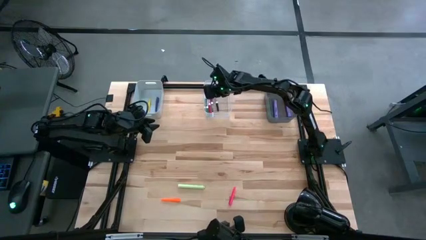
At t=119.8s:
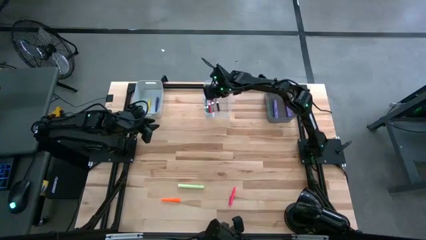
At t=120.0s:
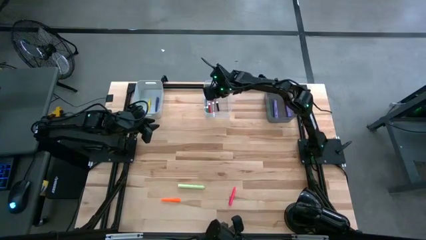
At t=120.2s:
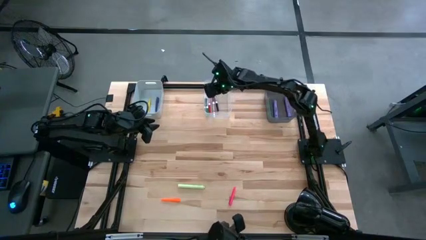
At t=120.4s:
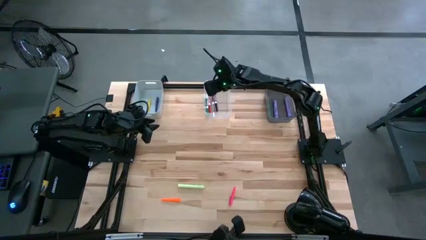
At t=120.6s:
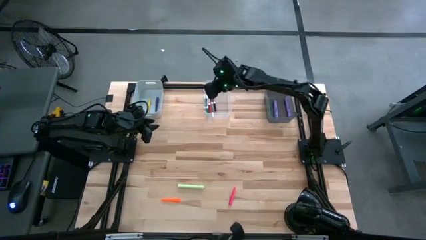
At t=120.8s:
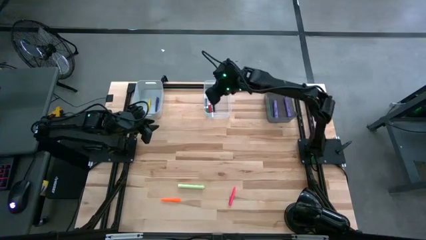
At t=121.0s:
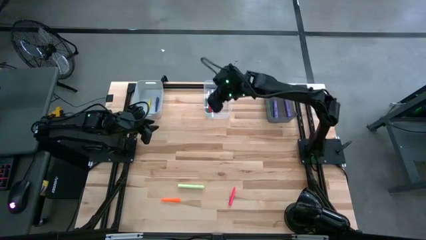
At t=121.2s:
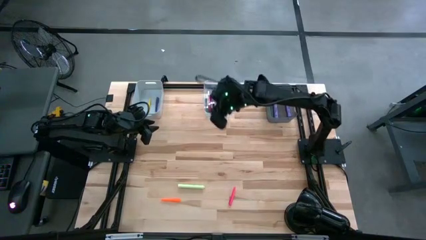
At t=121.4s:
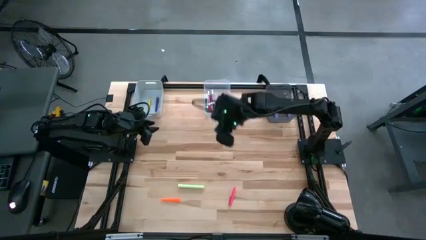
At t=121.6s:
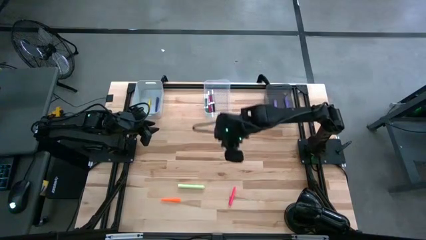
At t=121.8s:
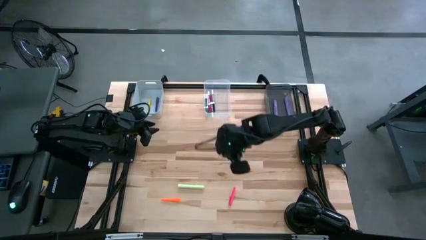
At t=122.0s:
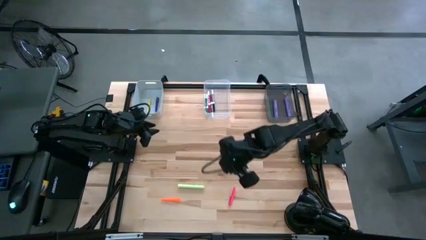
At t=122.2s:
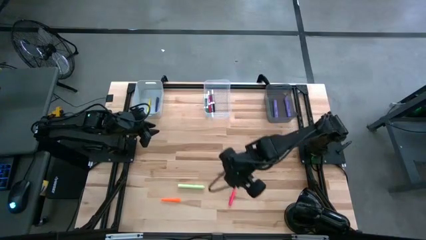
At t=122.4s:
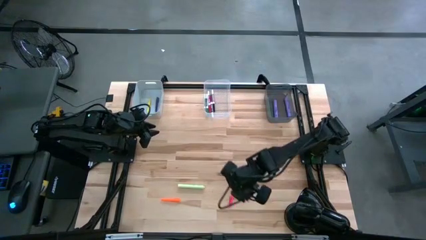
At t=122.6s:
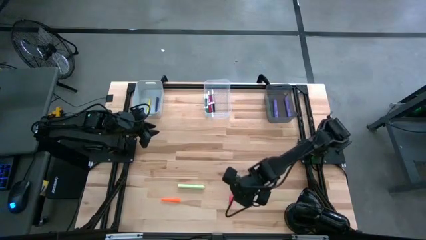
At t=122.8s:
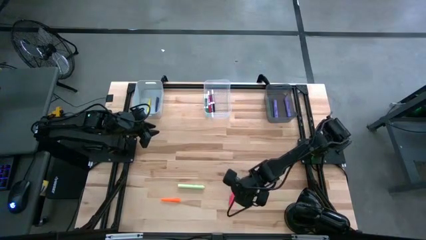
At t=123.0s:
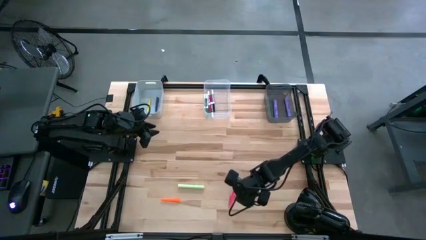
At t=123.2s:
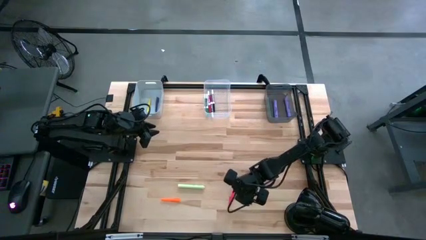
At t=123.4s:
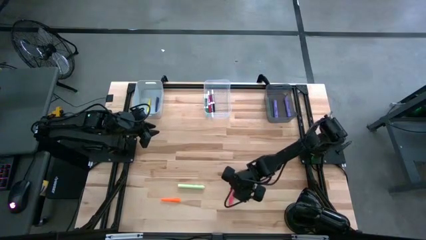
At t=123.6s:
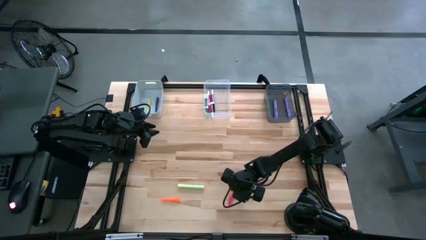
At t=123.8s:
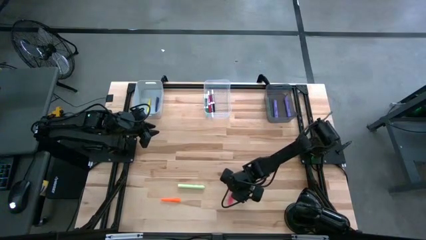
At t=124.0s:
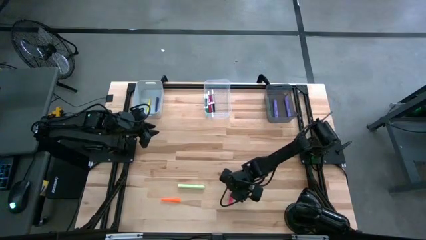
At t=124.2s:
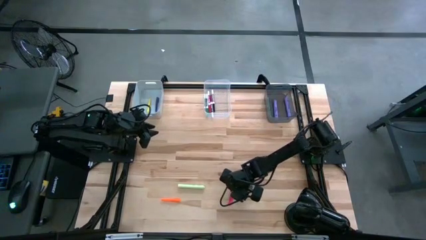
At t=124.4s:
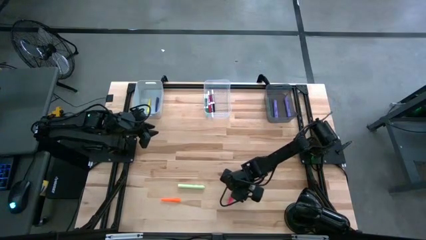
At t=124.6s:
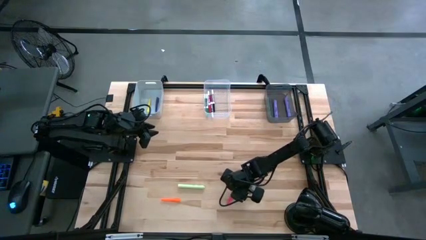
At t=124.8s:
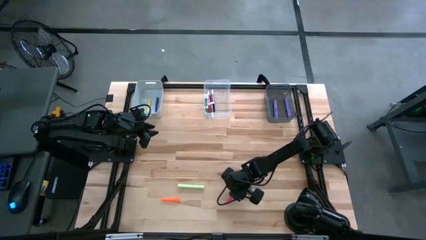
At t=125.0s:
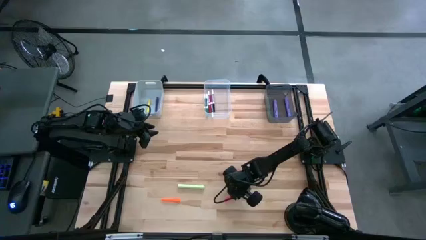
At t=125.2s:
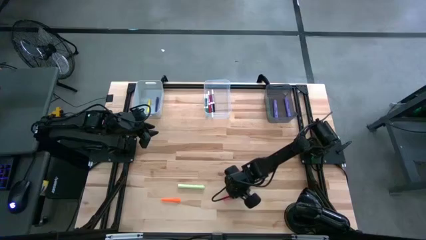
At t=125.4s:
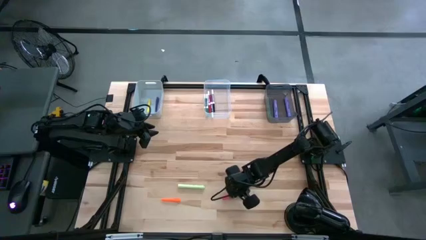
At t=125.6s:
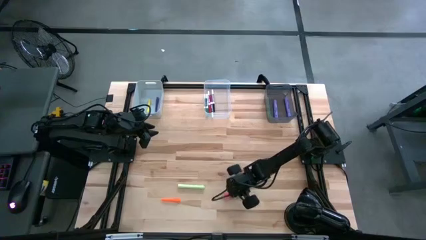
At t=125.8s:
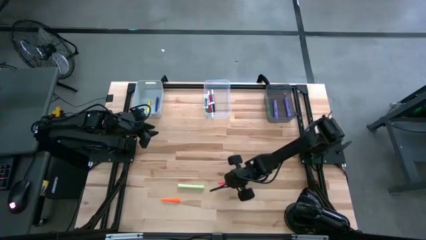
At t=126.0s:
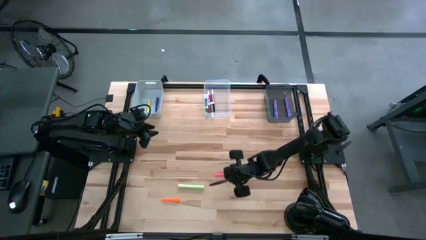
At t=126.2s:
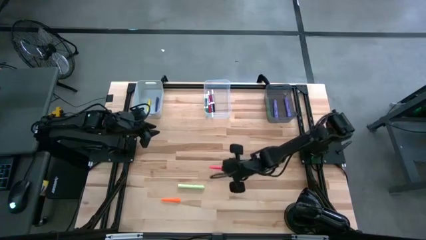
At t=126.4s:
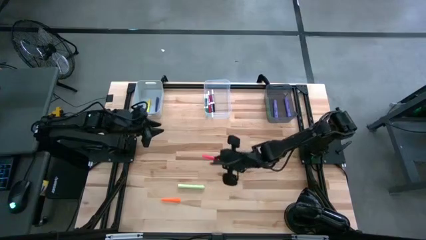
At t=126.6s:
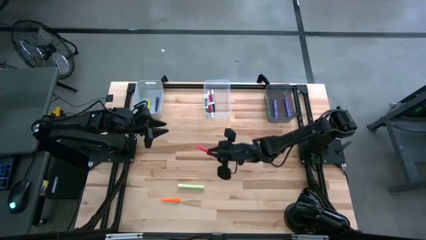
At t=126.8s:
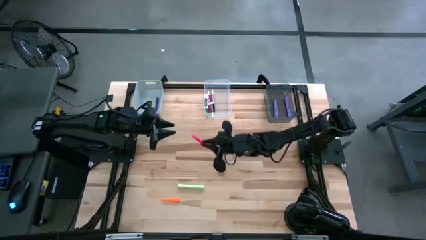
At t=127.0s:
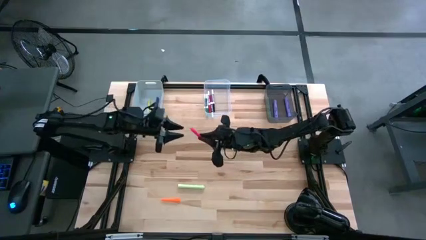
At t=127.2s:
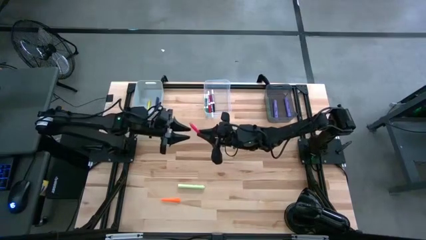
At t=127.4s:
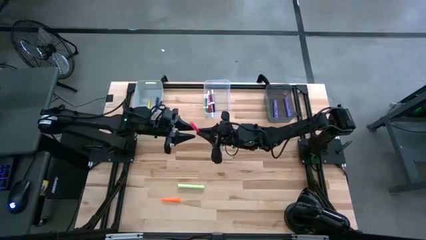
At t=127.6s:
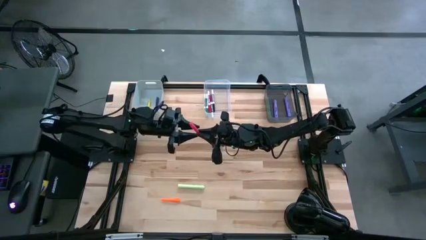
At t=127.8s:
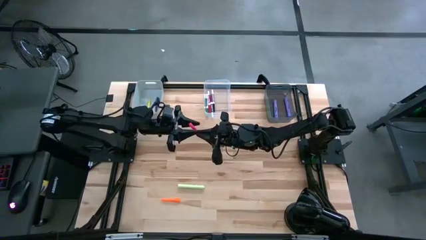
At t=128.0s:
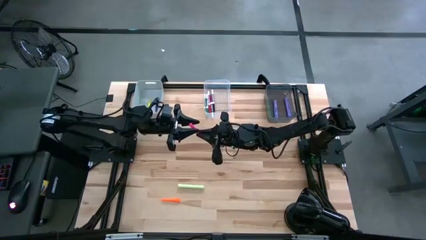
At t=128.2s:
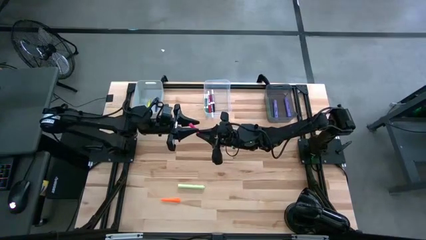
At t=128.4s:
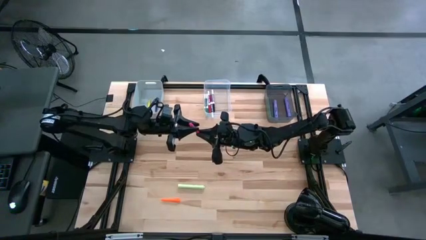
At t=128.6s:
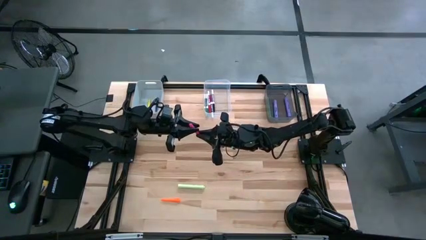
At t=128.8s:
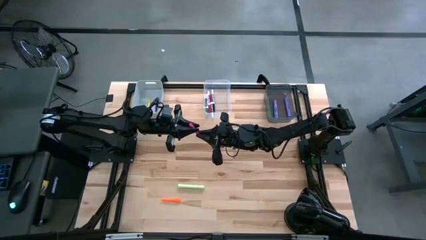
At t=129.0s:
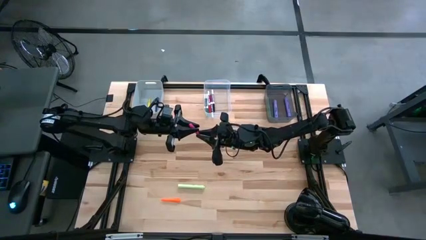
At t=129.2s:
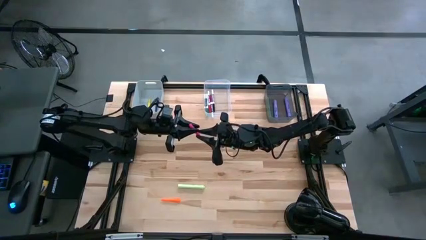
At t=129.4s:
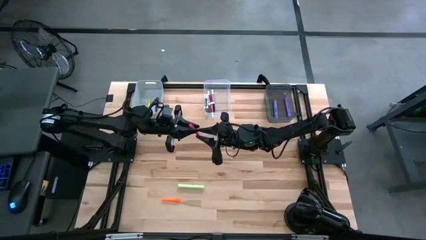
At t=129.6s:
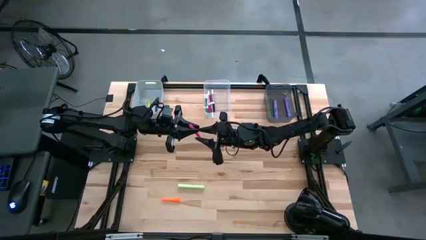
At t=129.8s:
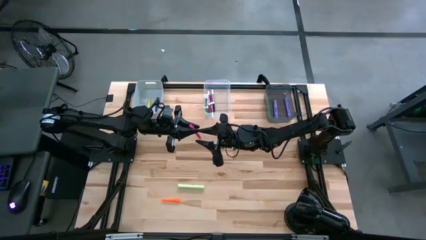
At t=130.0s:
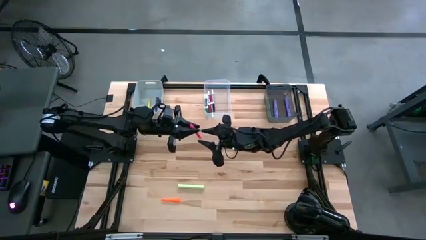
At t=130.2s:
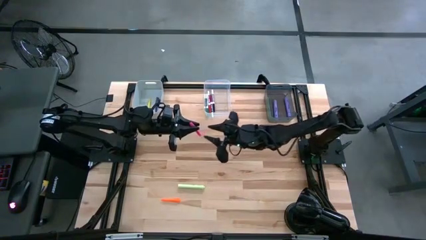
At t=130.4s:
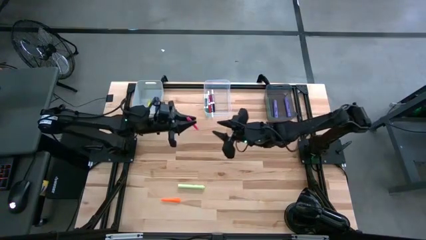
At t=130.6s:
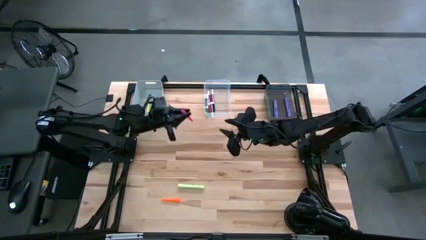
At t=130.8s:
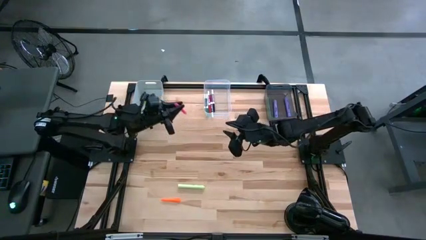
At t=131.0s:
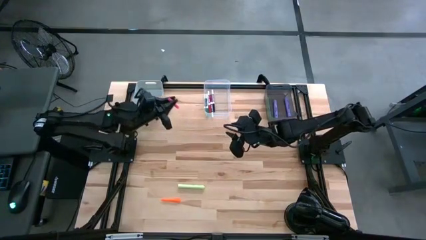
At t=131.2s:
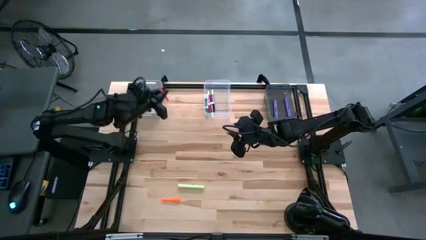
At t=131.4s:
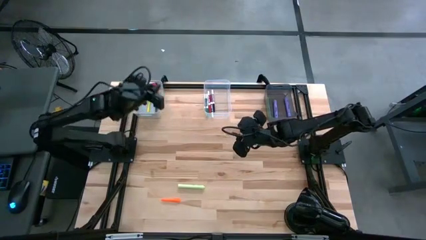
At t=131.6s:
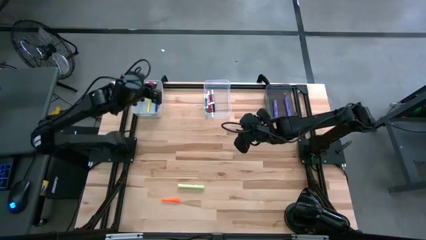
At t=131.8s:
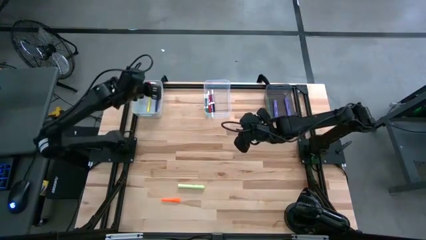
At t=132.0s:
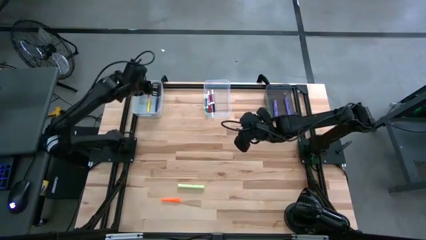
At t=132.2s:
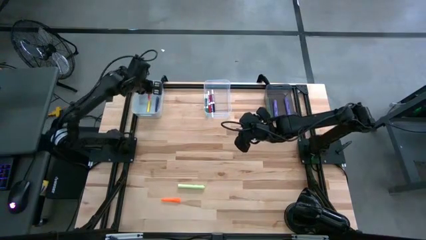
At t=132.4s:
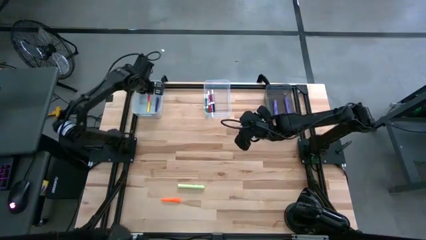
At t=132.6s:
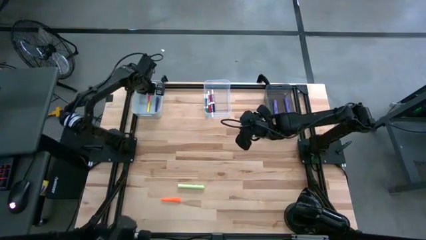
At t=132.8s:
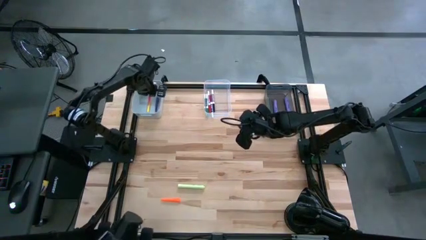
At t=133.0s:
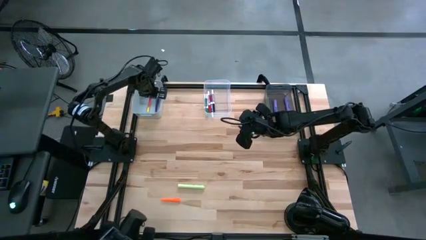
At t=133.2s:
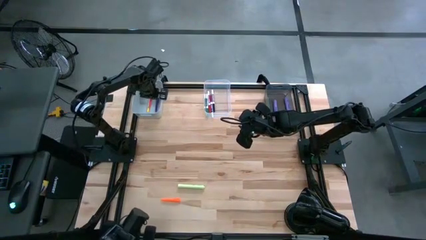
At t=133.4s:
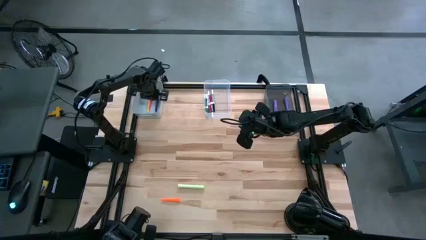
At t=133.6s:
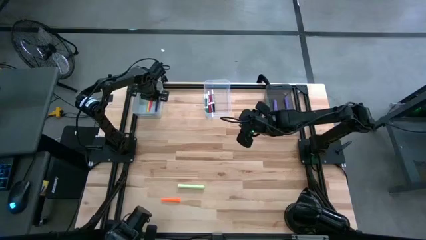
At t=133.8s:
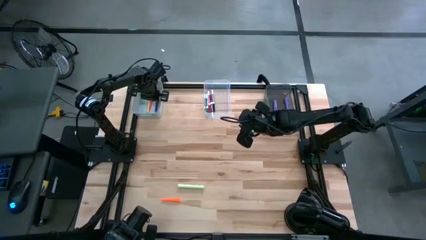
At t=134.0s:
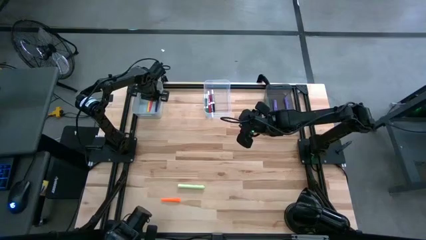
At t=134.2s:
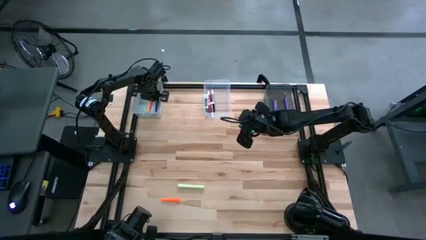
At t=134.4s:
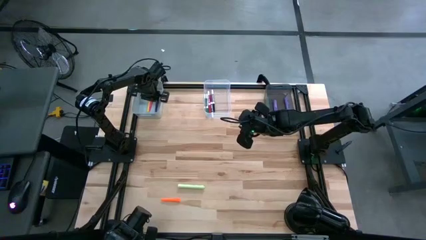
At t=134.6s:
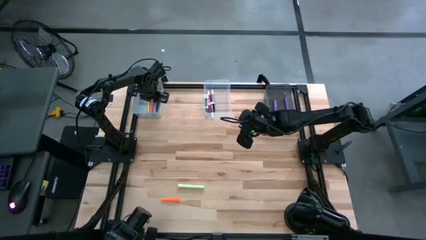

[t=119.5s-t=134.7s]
Task: Pick & Place Markers
Put the pink pen into the gray bin
